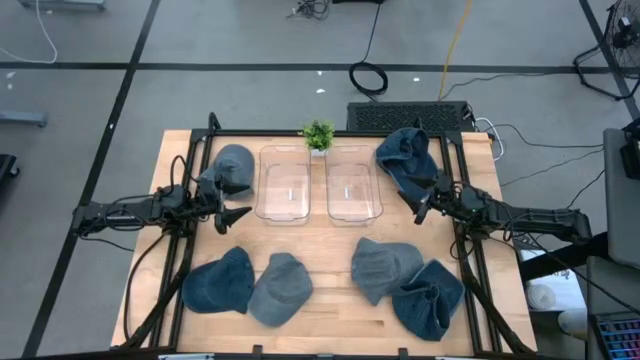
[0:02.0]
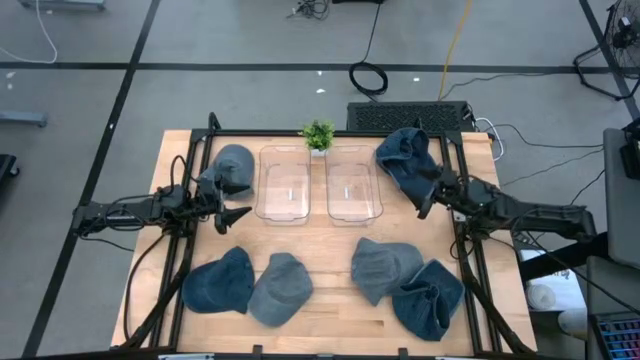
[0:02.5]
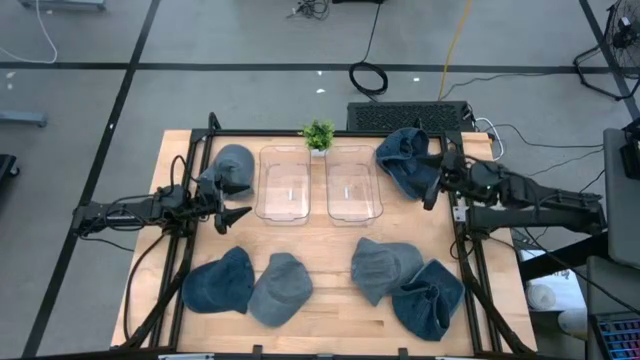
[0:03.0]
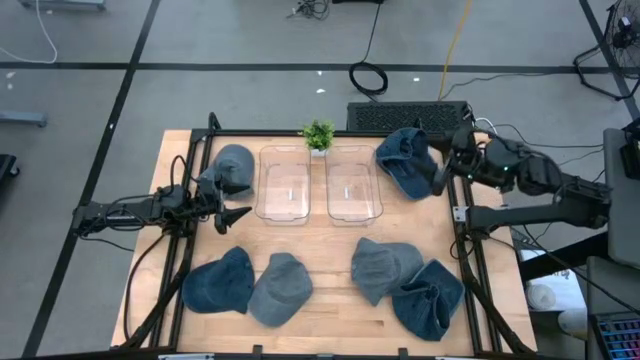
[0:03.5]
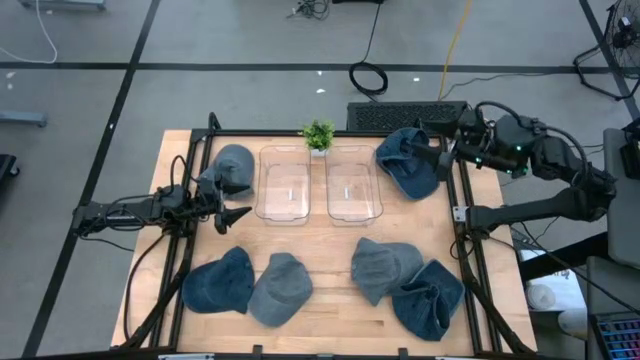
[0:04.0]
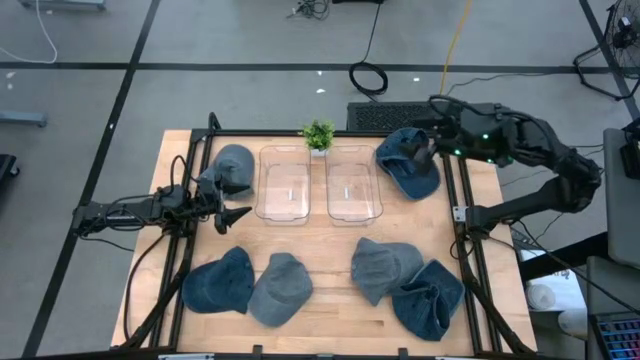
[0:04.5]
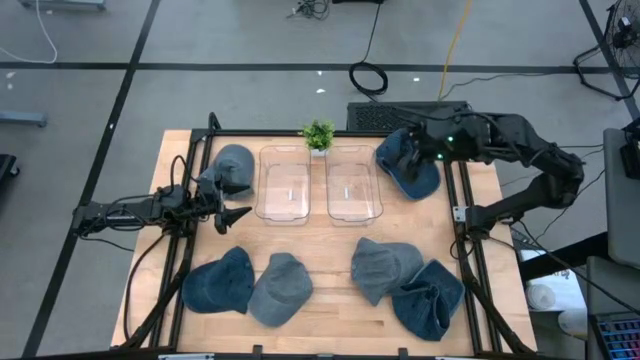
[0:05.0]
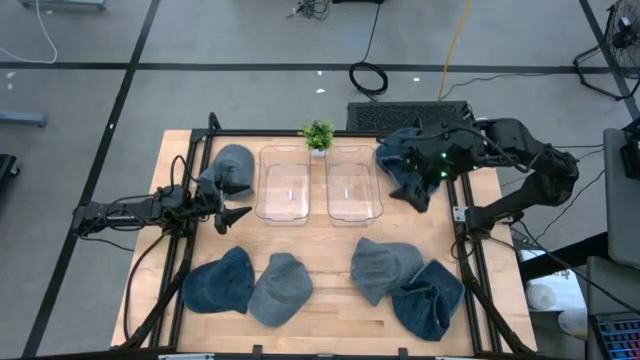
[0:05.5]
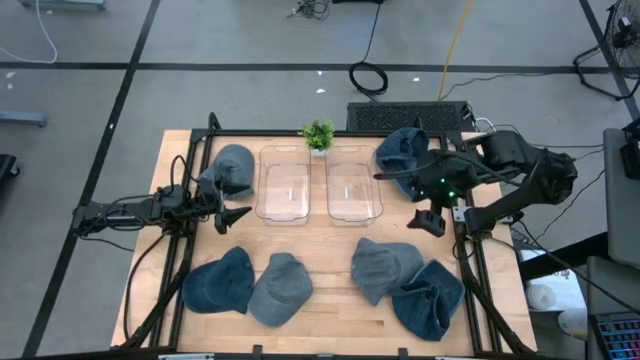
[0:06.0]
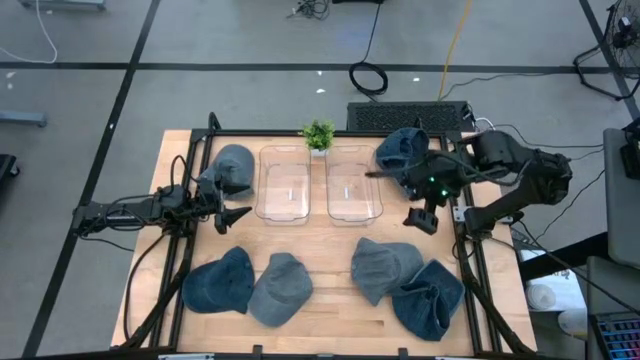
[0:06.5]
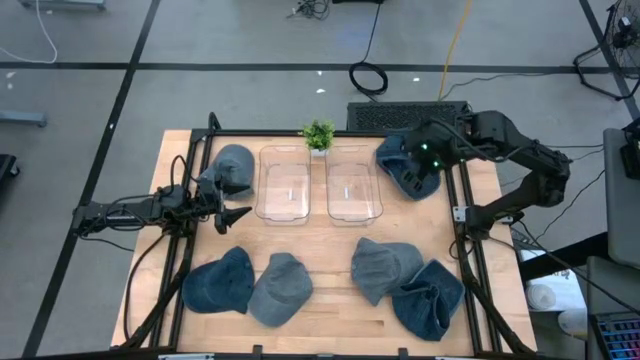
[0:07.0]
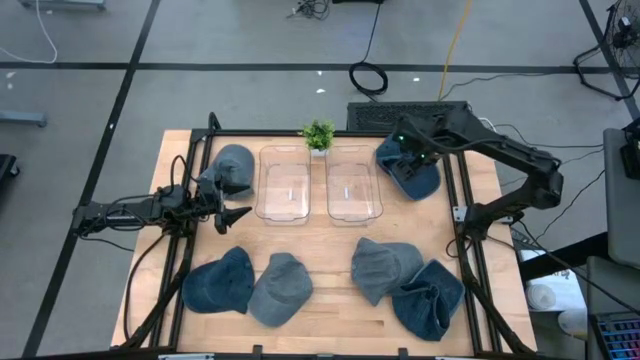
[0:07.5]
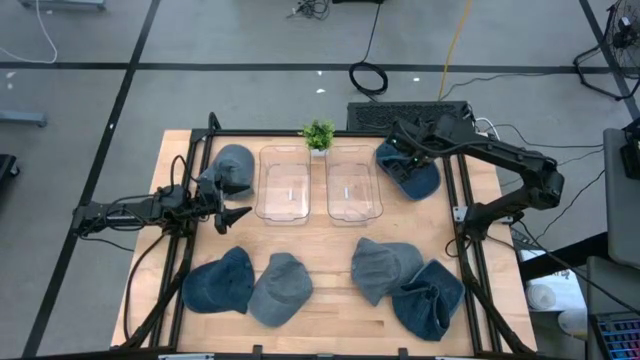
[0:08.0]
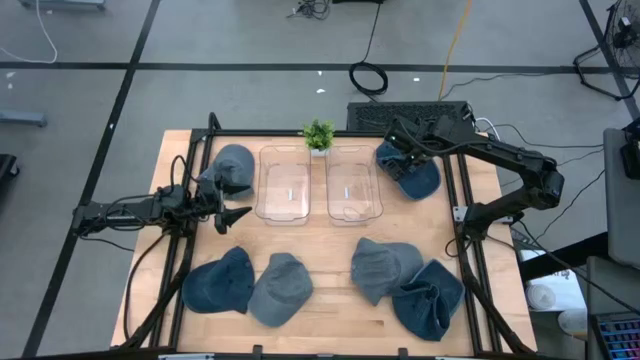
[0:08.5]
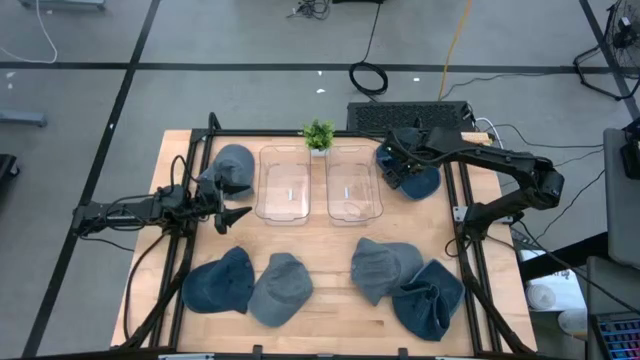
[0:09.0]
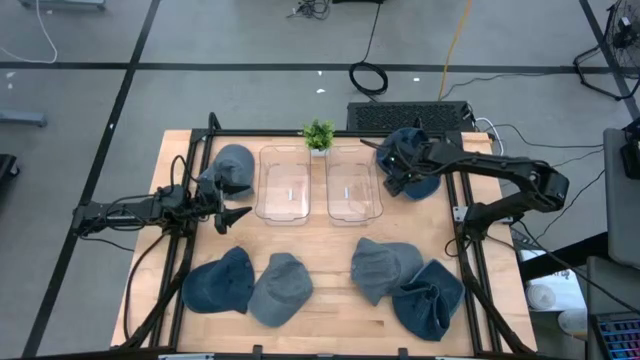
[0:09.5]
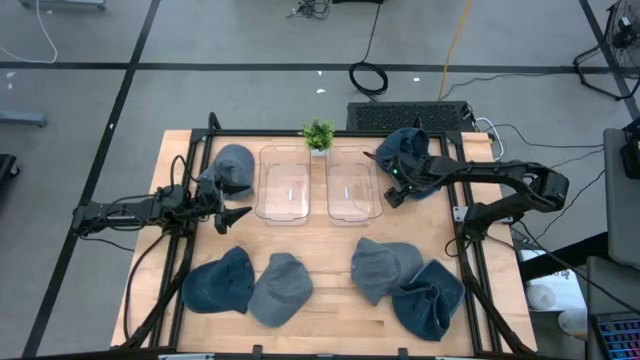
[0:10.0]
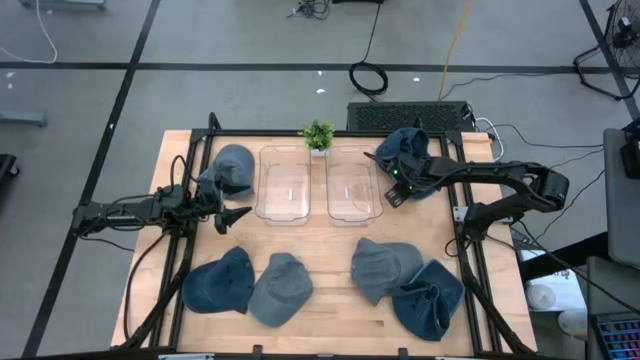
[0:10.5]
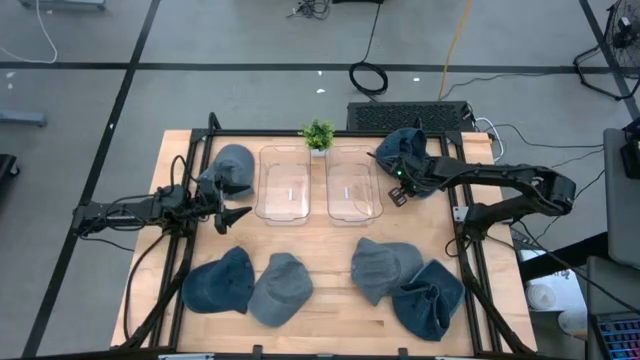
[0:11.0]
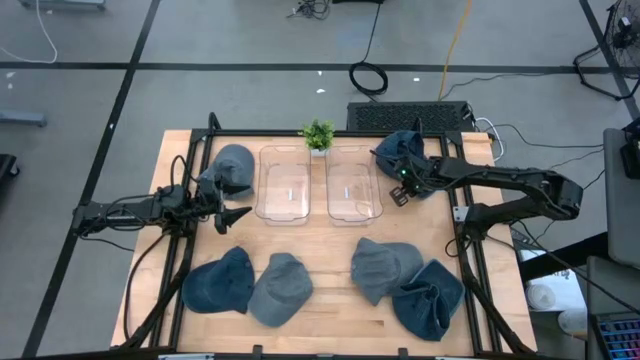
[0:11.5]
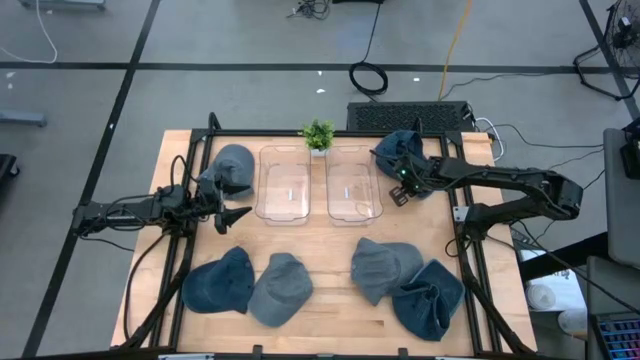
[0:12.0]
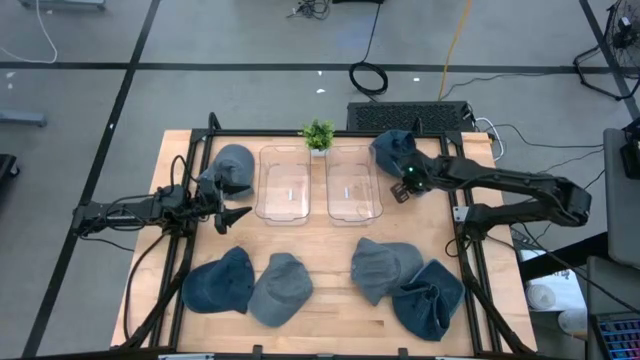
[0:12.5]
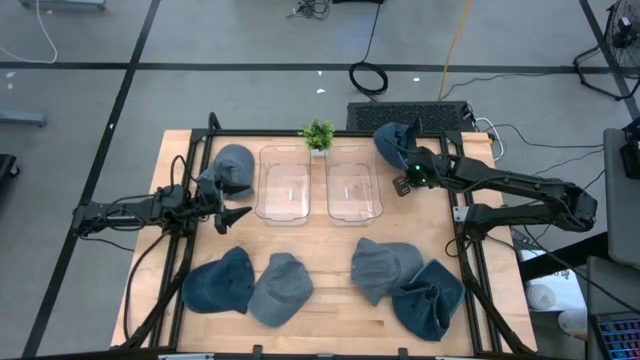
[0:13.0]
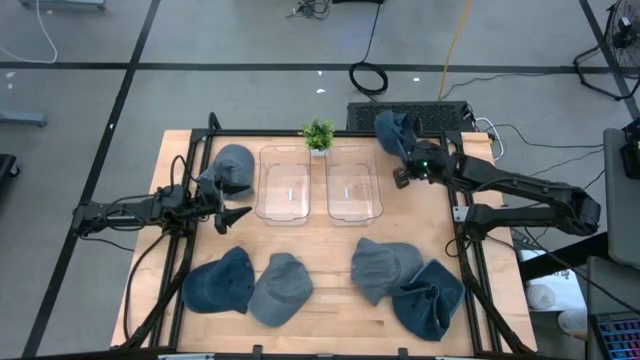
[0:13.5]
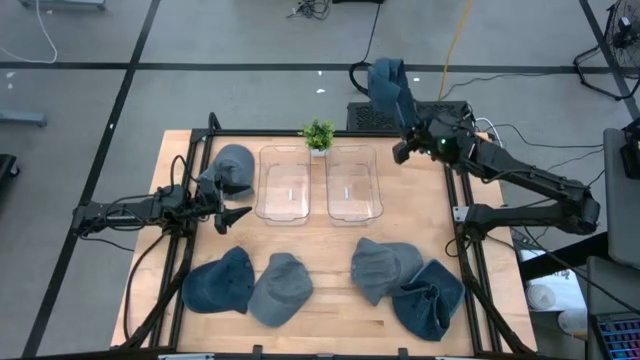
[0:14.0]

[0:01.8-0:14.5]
Task: Pick & Place hat
Put the top blue cap into the left transparent bin

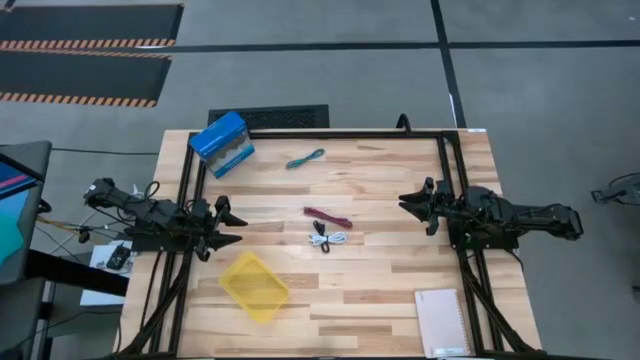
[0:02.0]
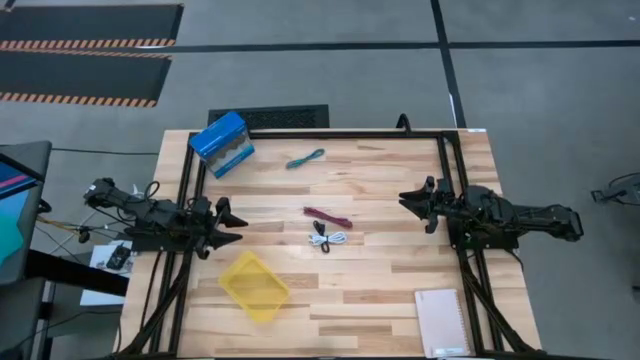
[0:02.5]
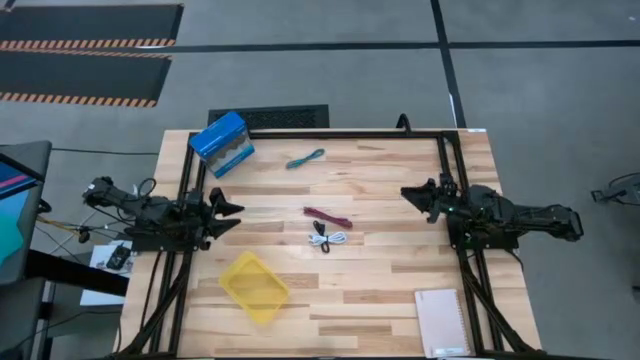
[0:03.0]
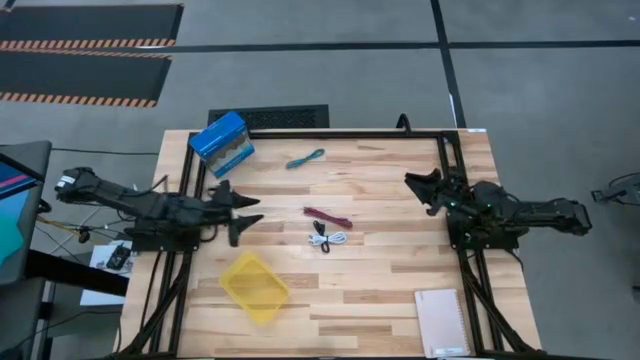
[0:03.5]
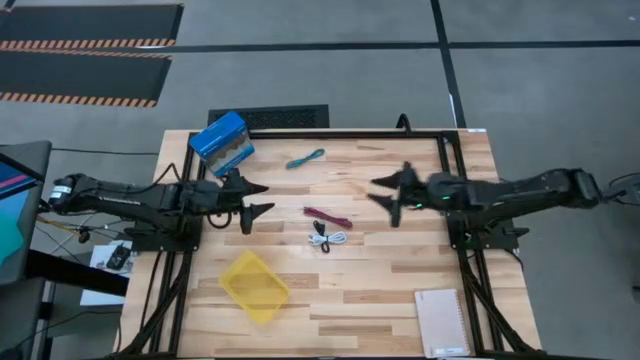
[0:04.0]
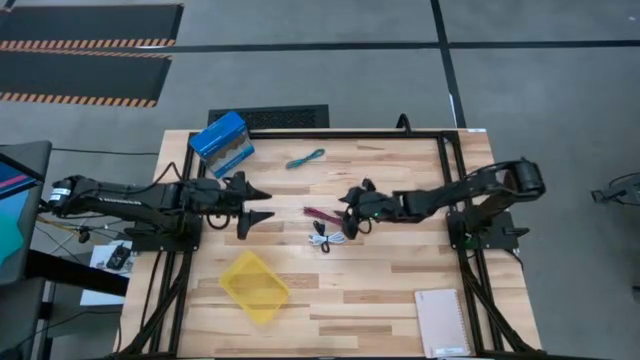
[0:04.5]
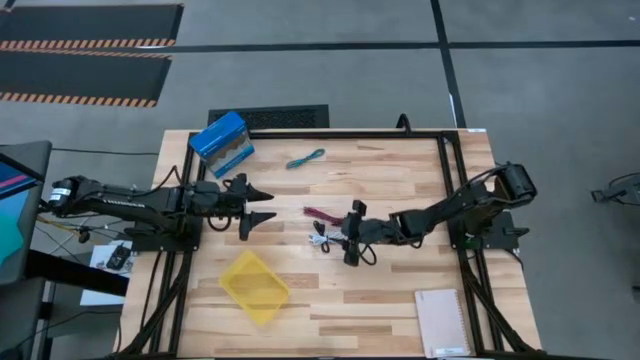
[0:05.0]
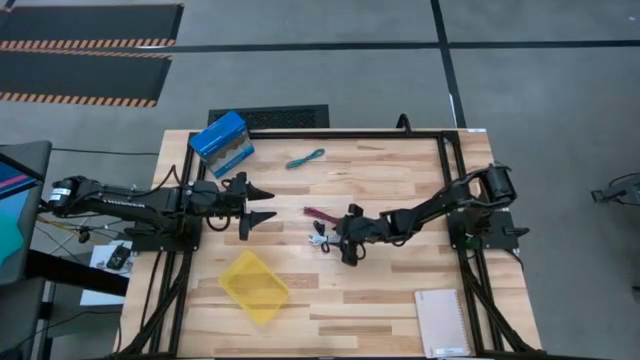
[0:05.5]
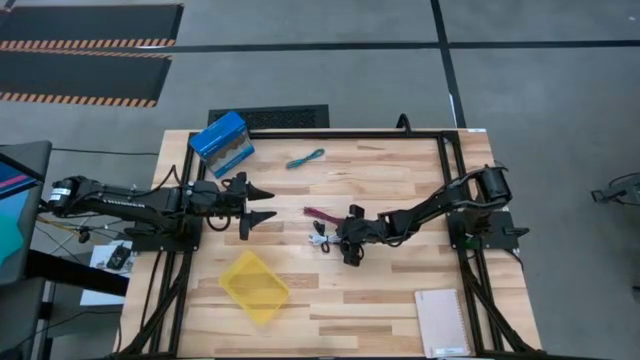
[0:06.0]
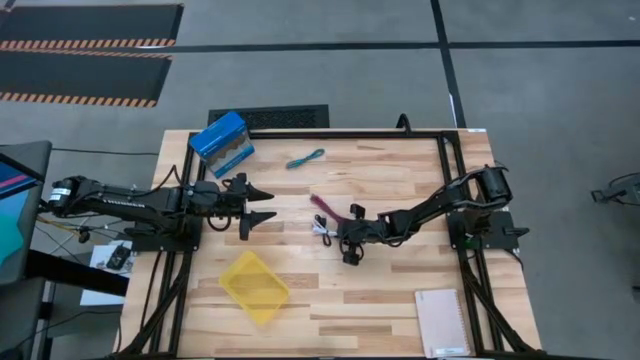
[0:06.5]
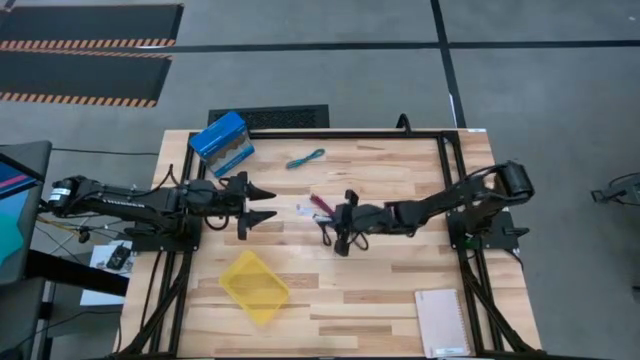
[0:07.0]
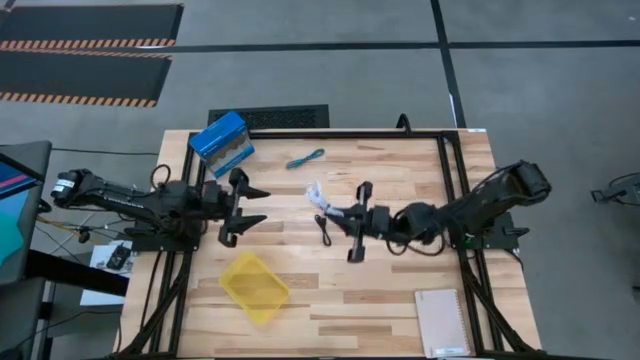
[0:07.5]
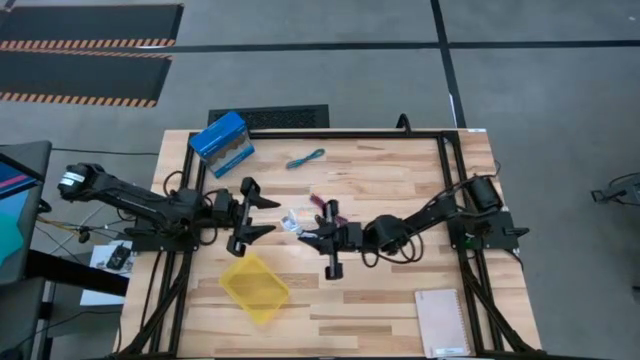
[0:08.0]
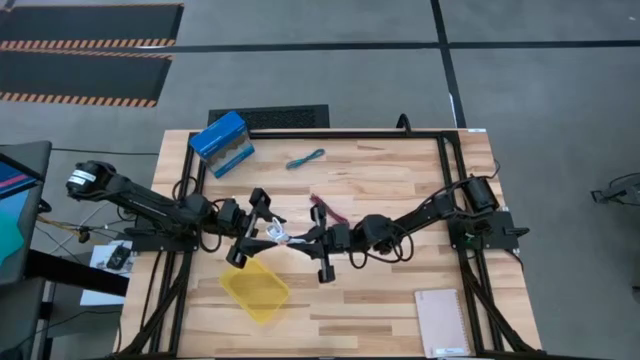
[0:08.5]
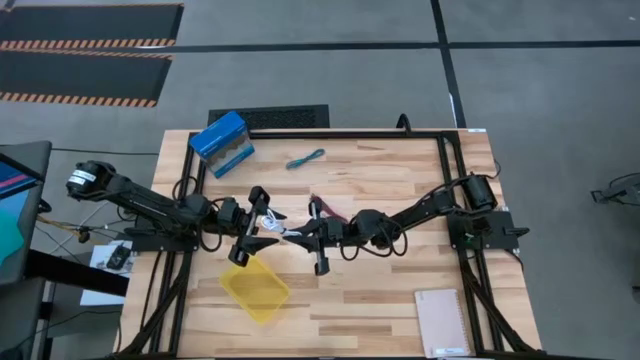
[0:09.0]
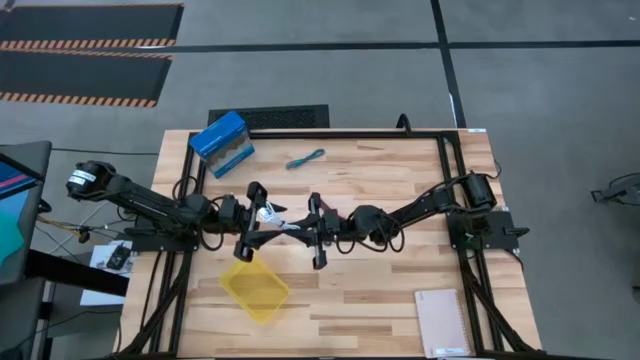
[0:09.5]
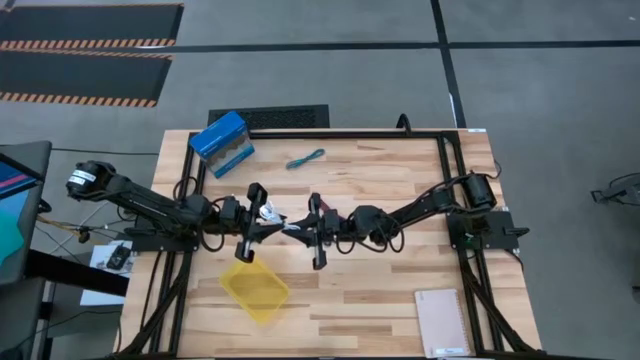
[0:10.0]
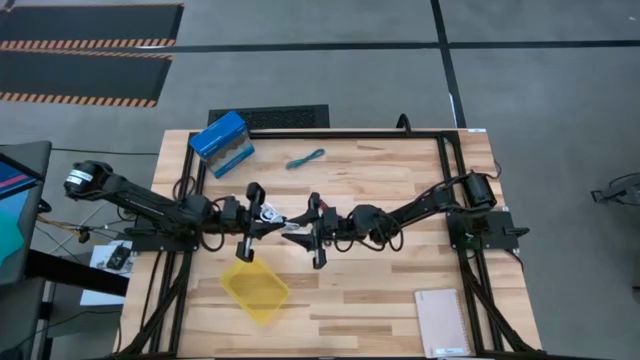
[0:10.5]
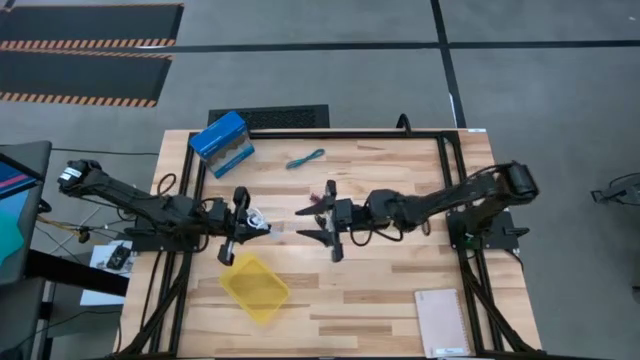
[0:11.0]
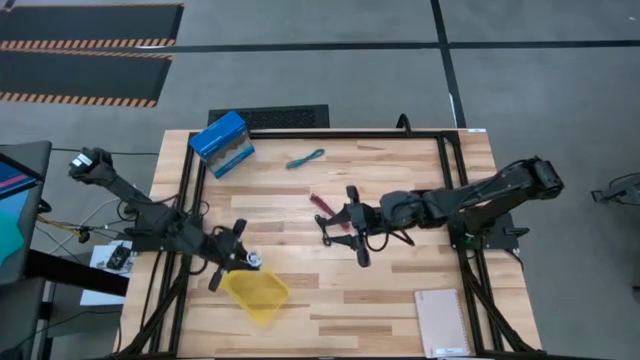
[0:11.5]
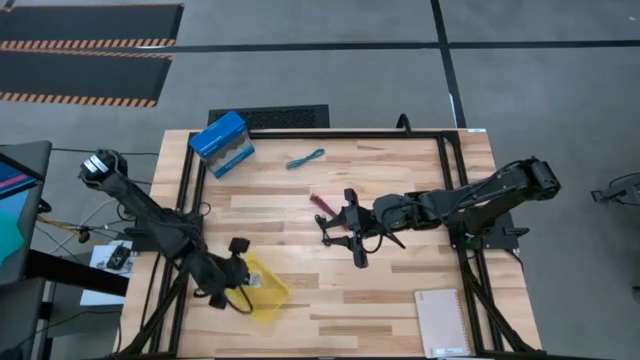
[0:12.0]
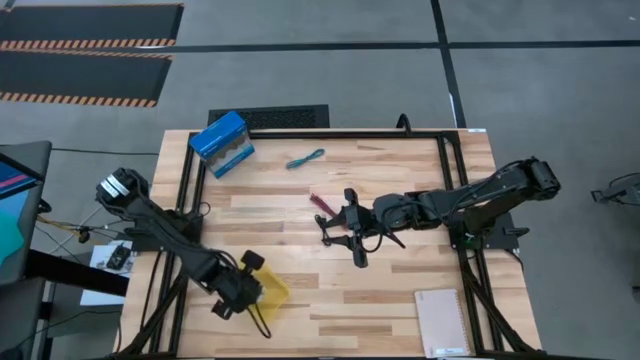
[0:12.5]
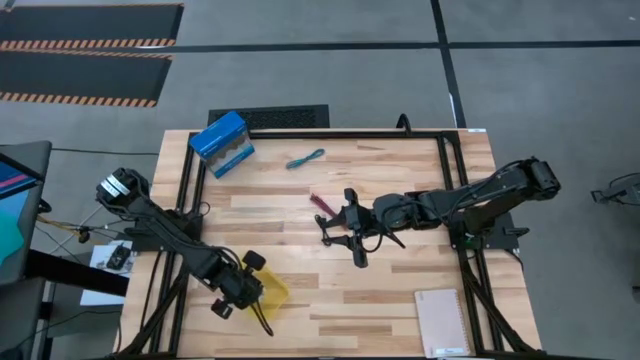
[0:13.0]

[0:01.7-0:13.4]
Task: Pick and place USB-C Cables
Put the white charger cable into the yellow bin
